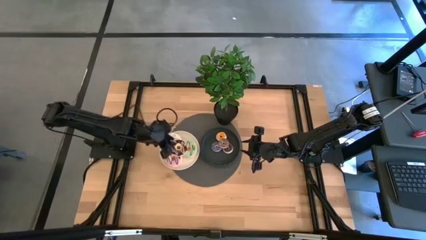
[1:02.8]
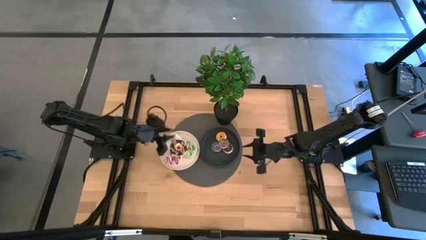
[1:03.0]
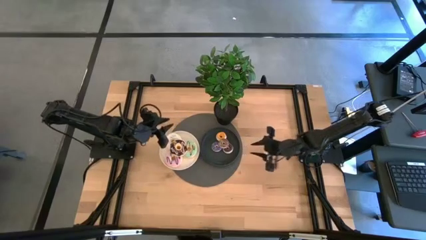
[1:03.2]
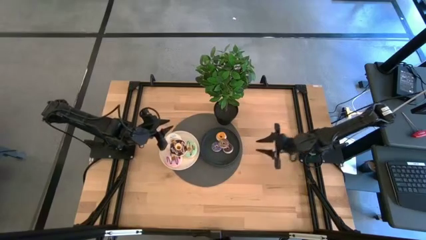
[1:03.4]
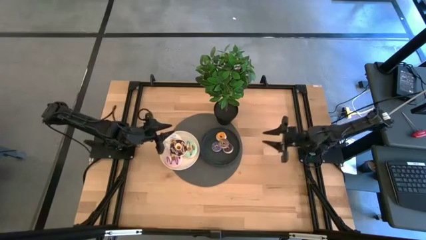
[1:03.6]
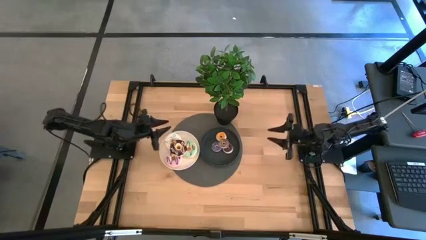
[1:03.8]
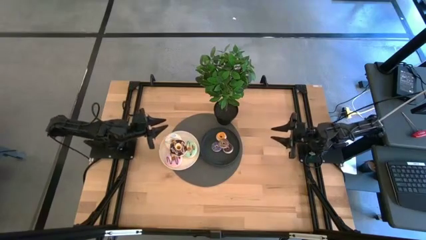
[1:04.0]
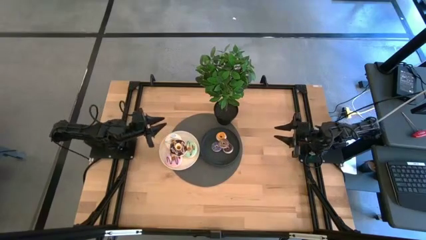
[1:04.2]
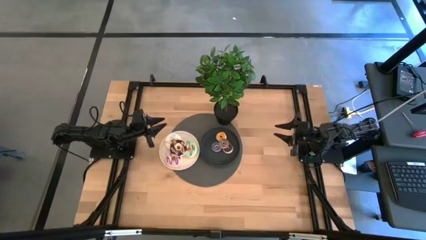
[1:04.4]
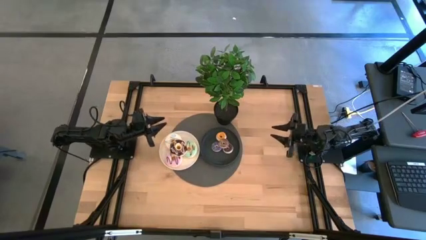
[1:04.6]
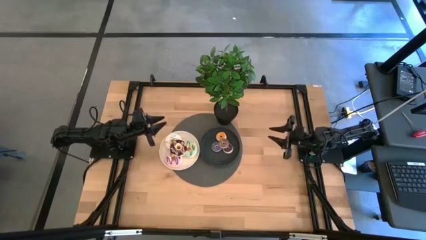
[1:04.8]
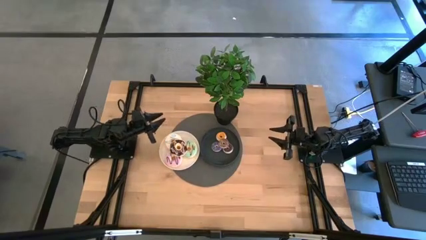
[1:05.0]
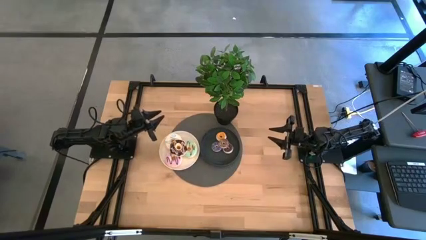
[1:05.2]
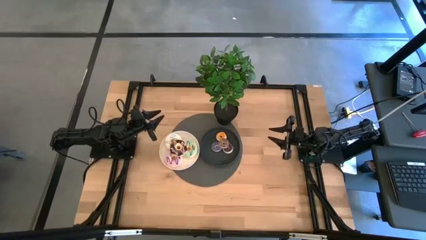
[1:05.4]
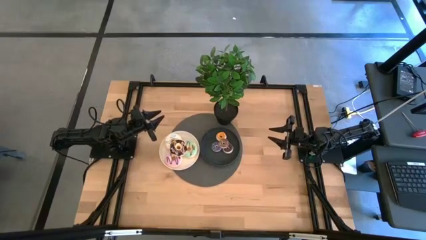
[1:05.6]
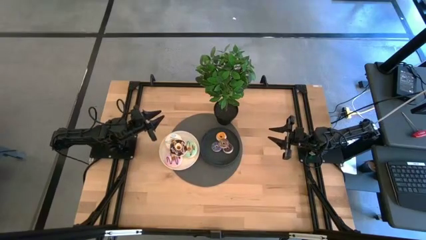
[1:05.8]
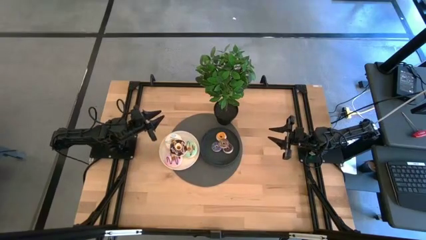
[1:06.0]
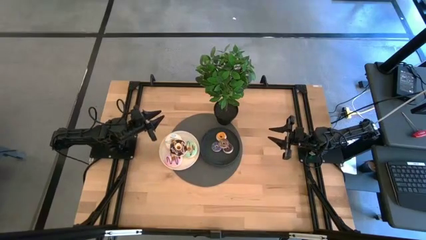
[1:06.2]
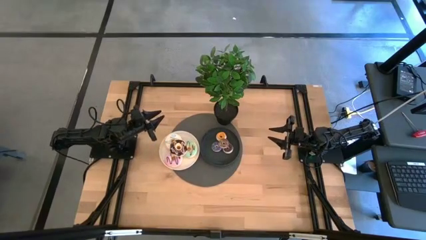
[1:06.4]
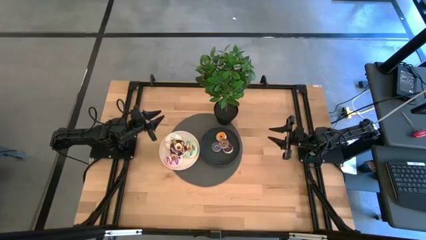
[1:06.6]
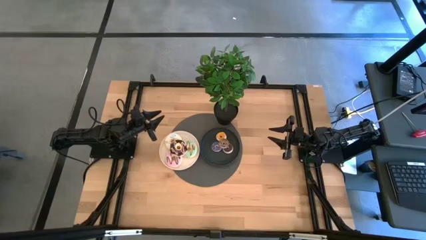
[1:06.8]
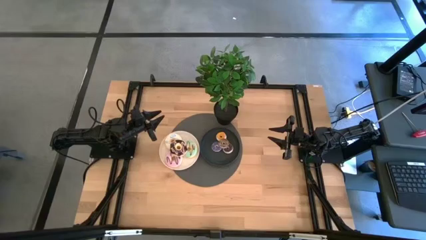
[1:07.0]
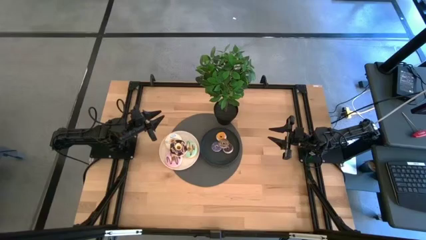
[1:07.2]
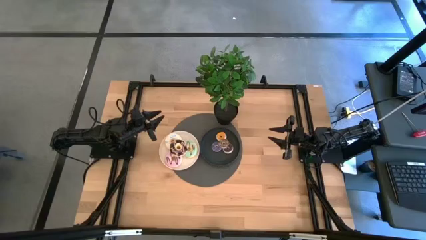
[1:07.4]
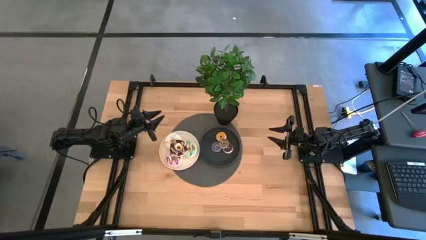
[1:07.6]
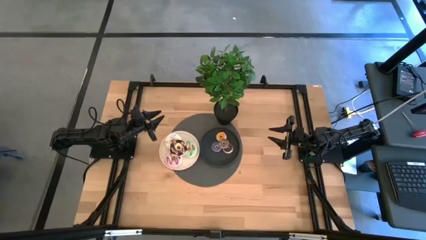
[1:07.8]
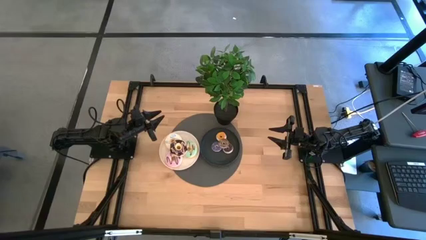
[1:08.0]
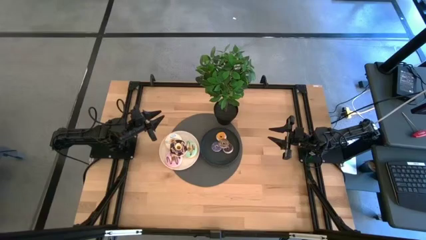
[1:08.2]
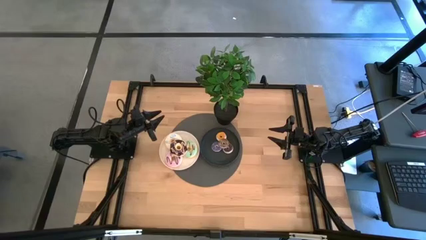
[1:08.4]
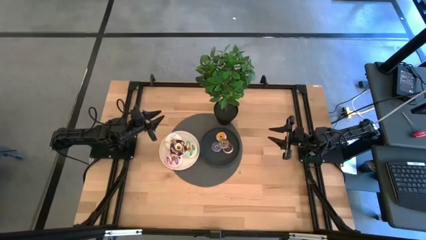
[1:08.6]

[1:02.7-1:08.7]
Task: Pick & Place donuts
Return to Home Position

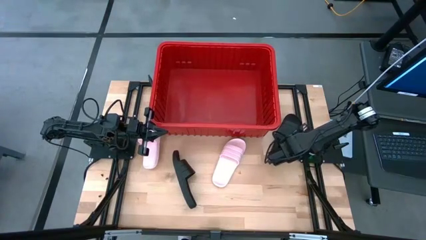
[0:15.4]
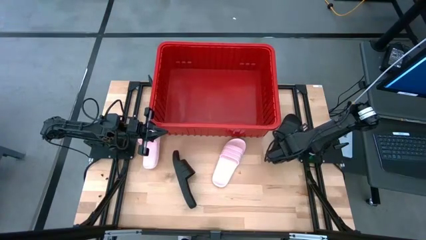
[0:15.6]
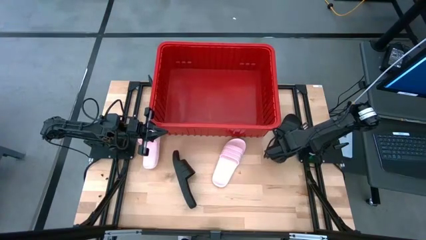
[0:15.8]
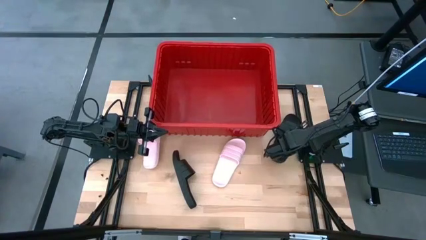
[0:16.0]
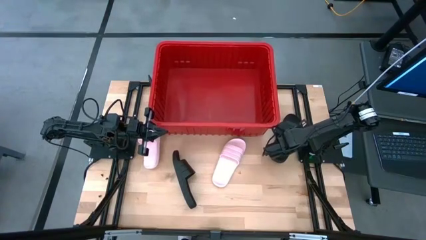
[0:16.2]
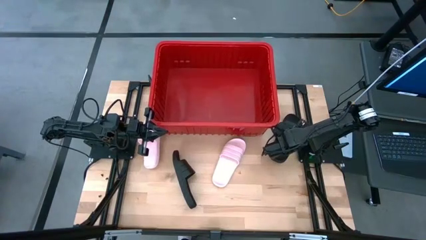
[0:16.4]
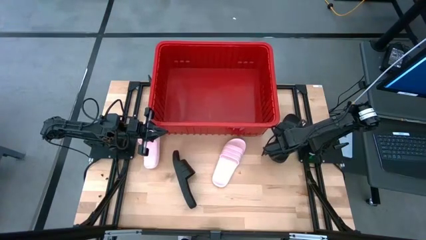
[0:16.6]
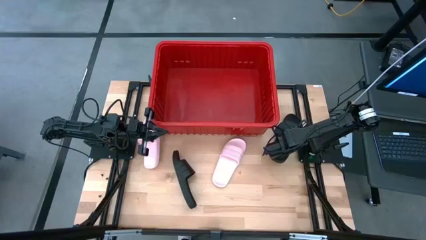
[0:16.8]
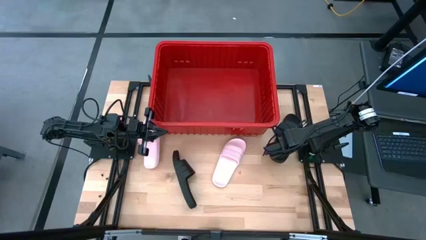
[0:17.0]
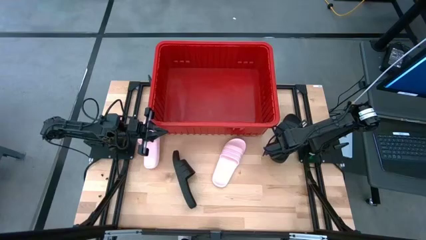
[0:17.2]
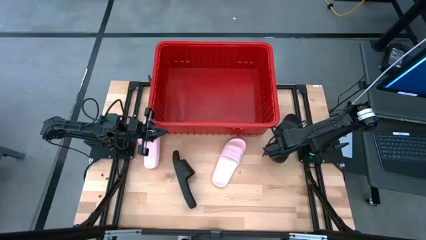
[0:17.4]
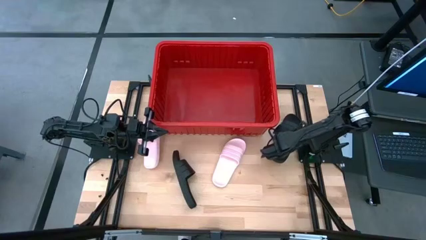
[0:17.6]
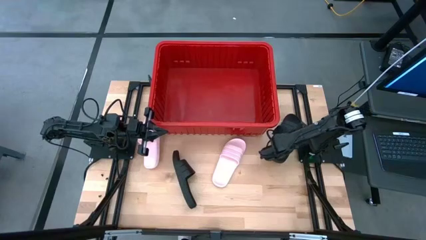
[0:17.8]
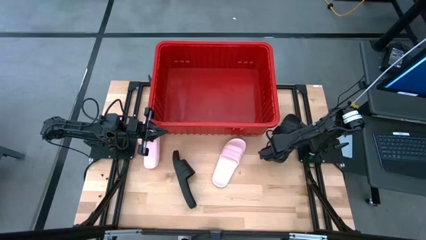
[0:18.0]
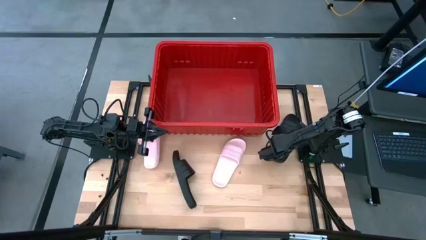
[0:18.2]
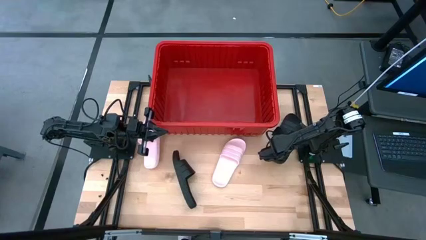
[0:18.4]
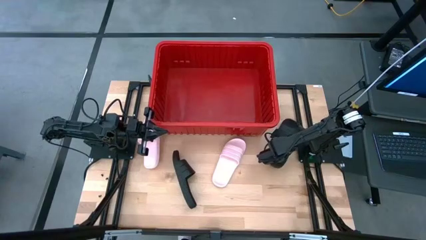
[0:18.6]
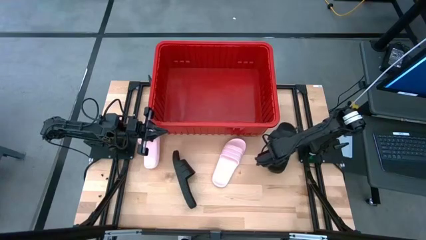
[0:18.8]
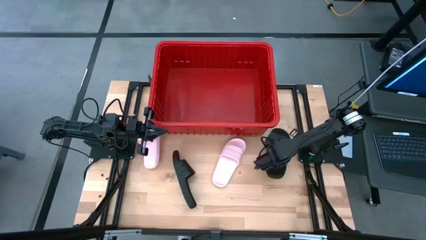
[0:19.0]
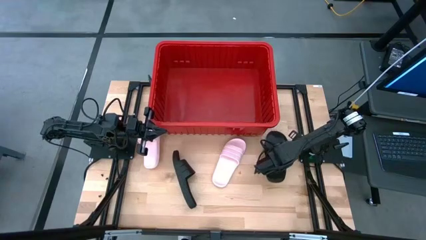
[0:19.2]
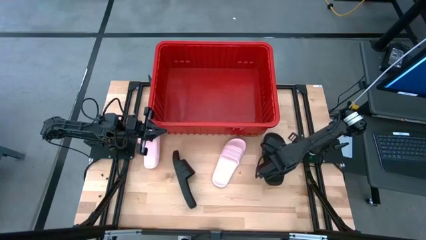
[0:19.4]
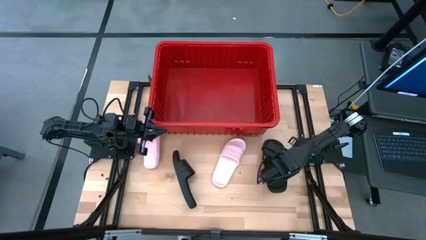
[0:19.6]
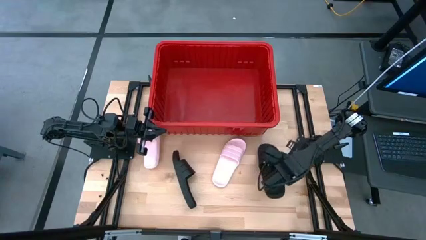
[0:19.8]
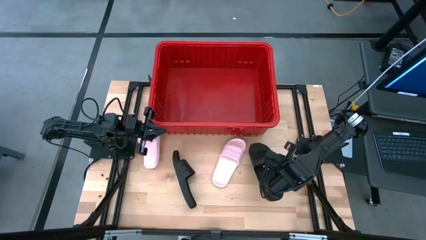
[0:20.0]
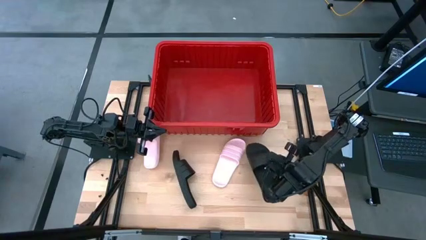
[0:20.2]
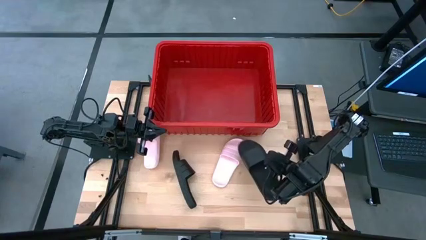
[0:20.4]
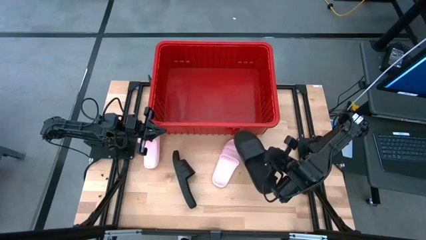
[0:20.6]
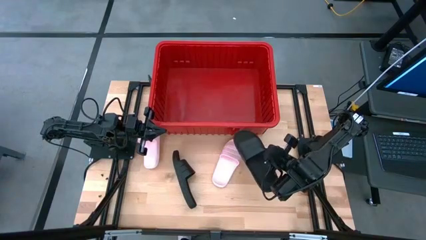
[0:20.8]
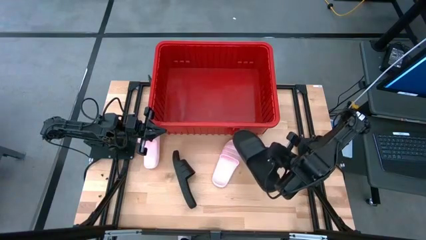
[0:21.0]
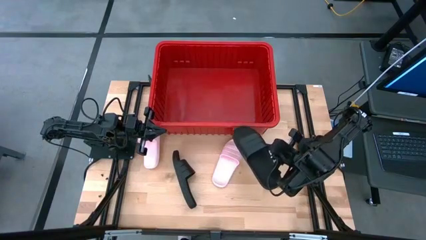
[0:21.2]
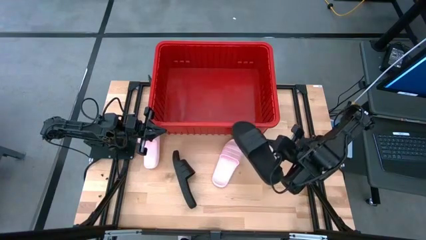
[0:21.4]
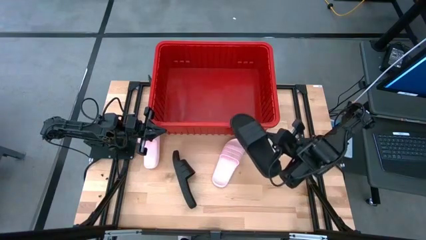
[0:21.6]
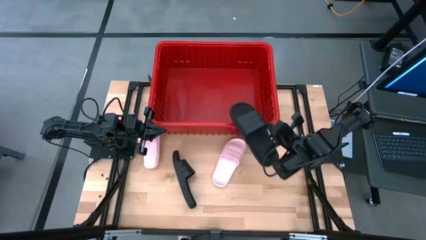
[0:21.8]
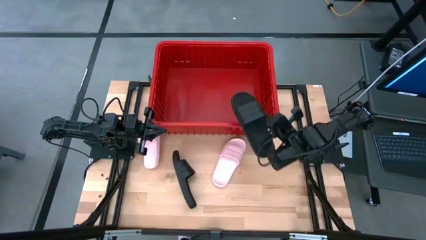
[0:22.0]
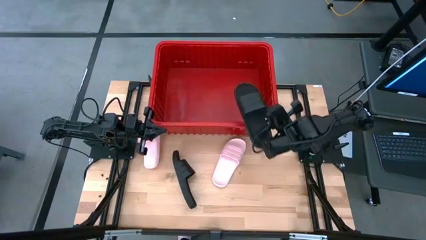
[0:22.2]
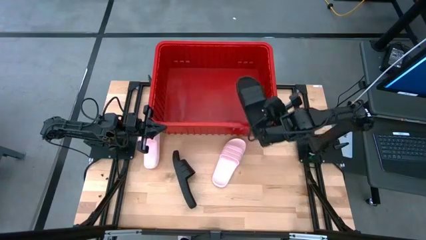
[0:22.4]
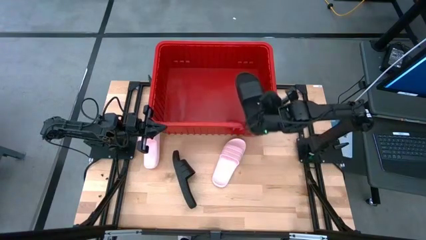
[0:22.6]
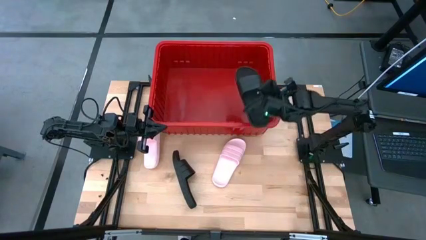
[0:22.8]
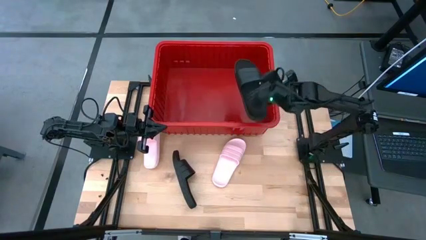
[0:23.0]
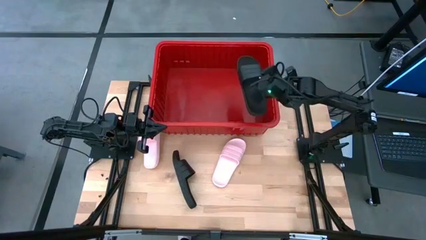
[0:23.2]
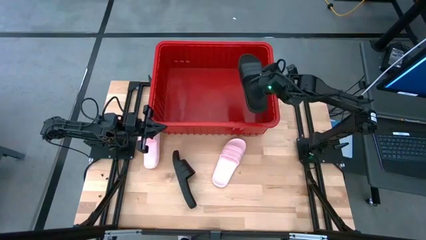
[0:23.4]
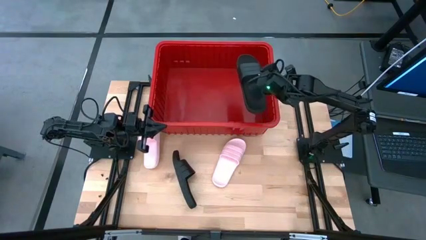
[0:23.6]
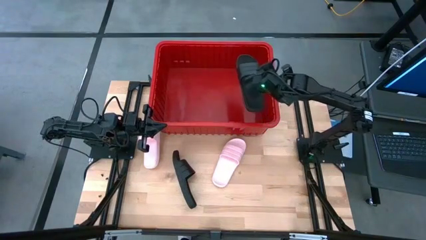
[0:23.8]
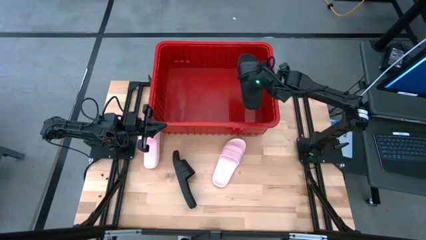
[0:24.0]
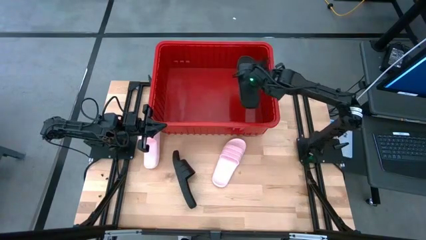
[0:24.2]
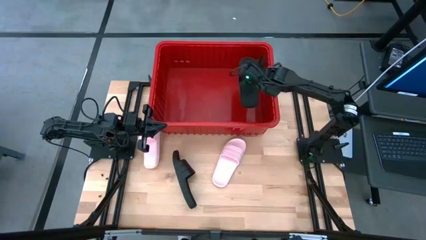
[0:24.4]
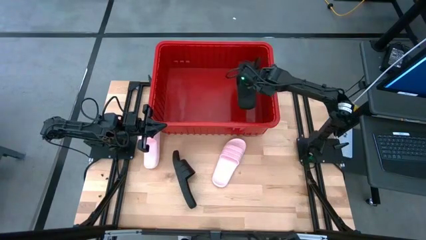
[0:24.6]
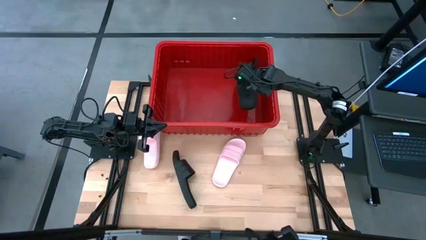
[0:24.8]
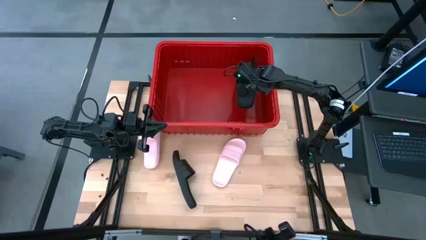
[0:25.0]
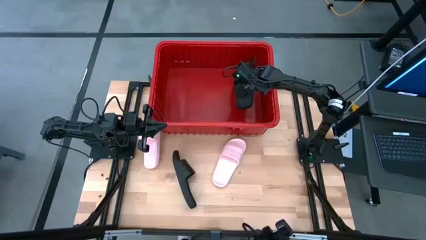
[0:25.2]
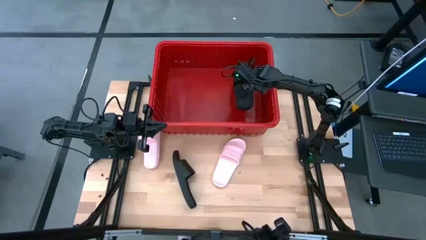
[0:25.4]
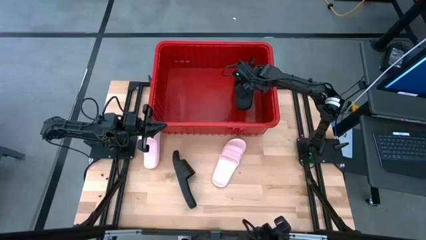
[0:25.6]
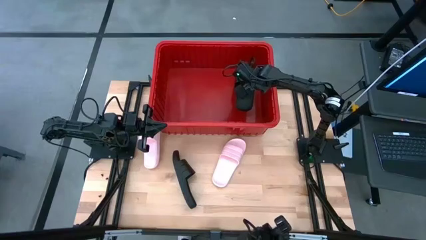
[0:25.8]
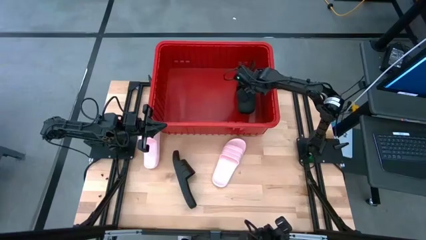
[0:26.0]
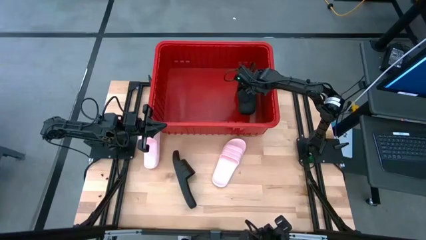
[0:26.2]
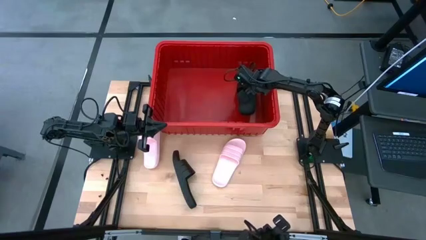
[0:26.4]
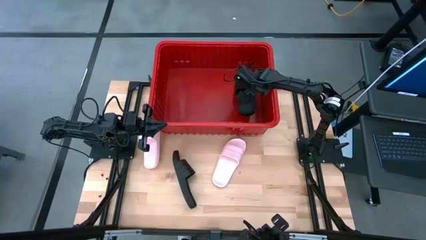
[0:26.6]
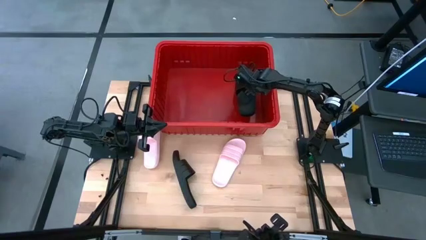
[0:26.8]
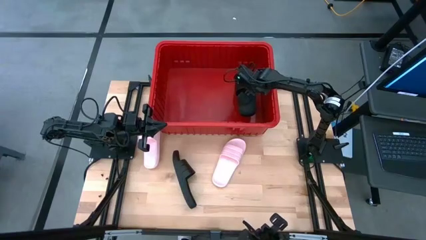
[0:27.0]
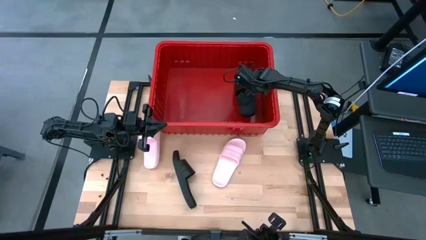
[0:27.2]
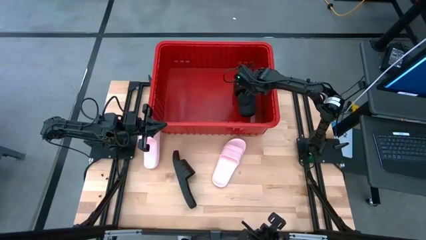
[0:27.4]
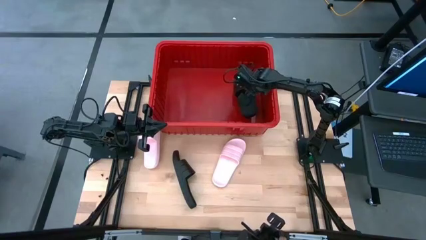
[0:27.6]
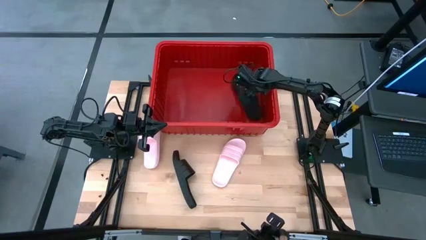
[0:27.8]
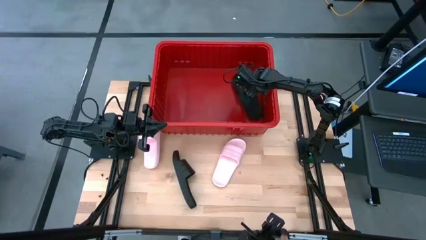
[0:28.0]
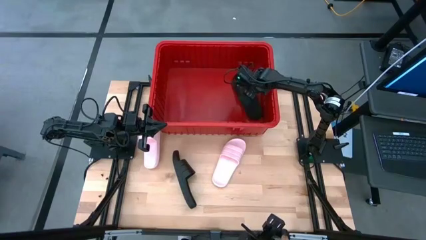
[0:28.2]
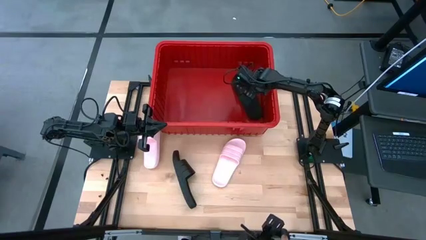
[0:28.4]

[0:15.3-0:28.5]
Task: Pick and place slides into bin
Put the right black slide into the bin
